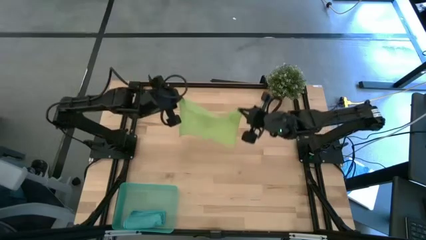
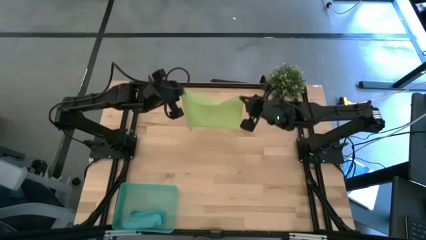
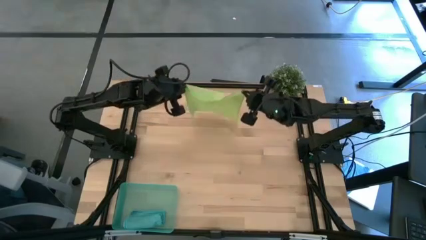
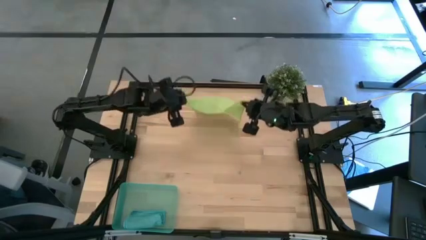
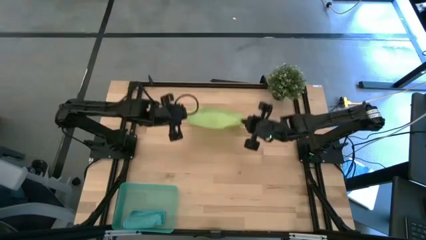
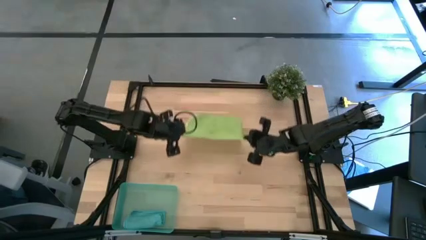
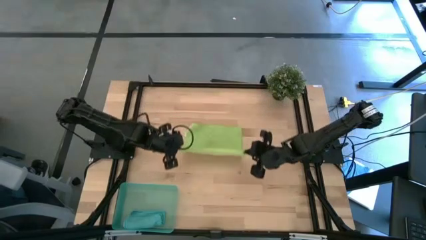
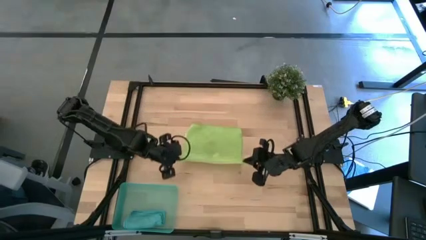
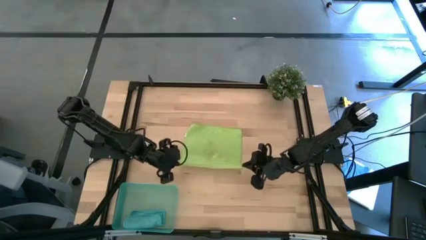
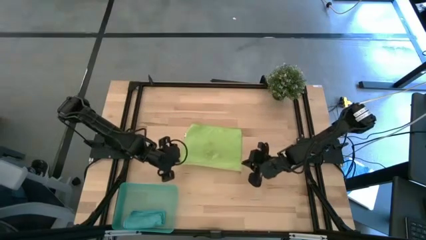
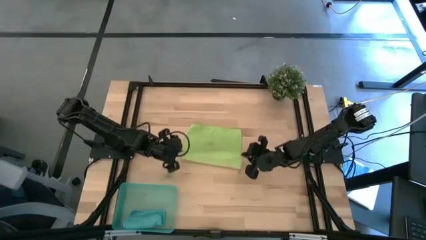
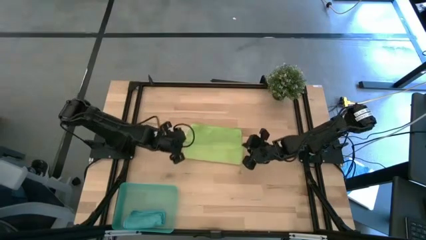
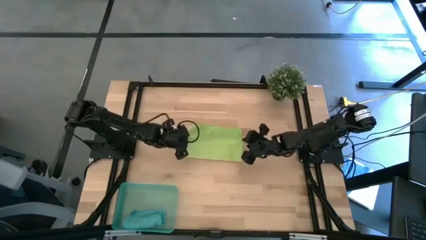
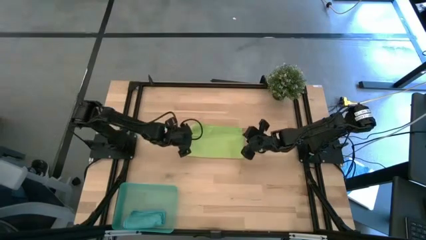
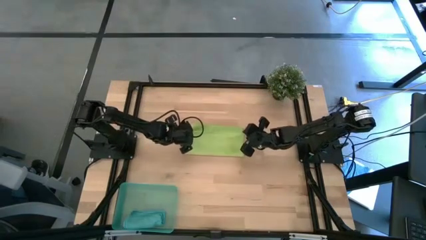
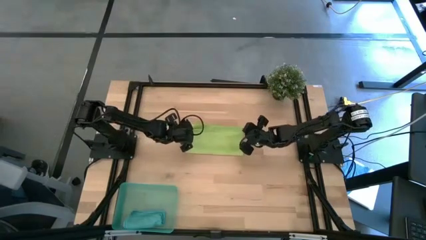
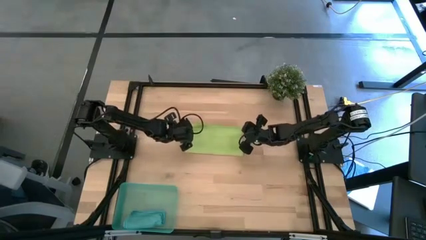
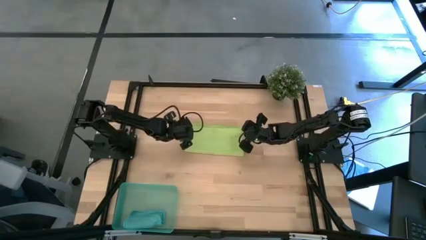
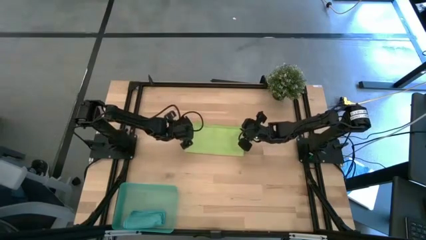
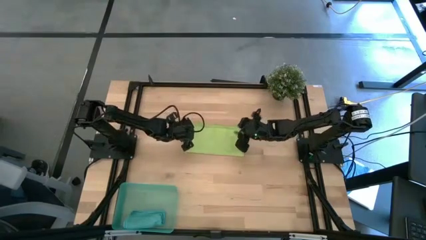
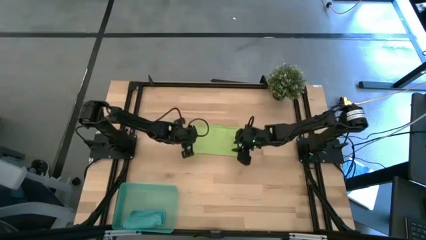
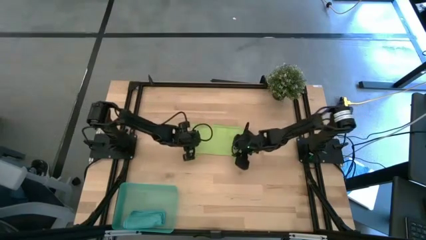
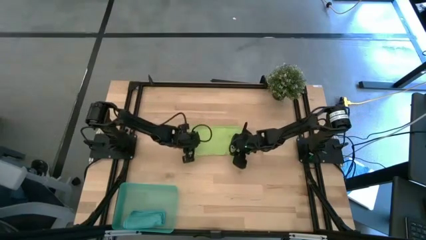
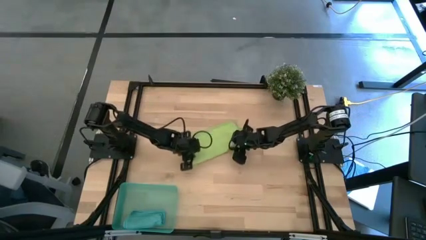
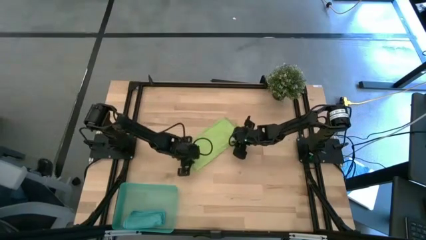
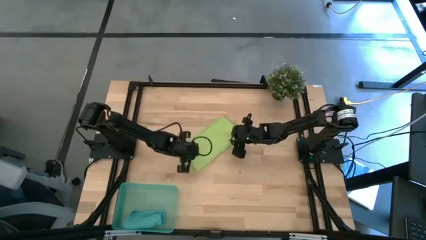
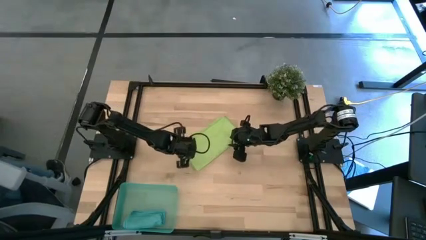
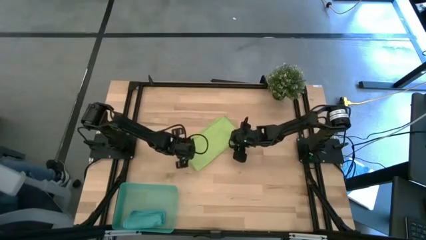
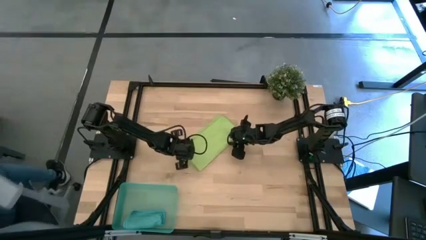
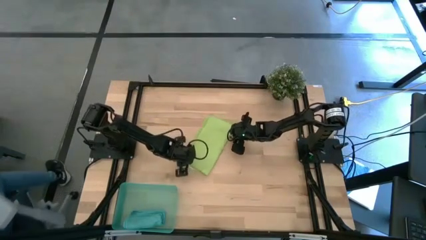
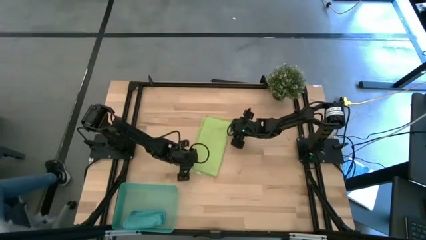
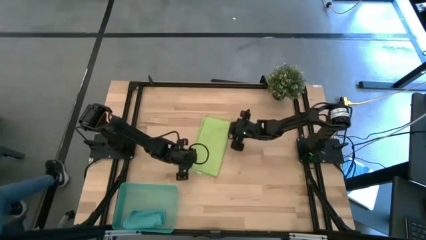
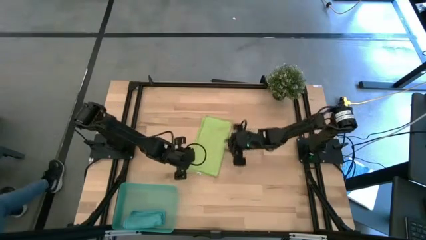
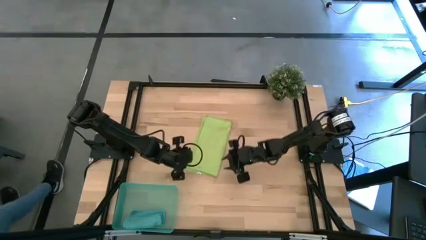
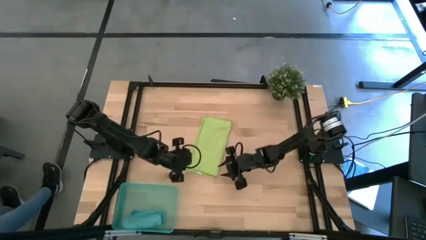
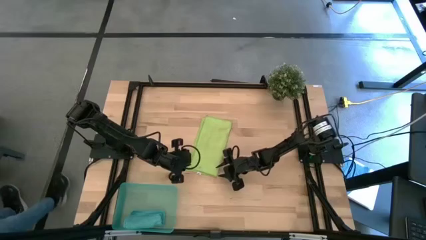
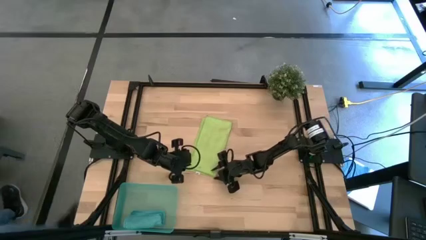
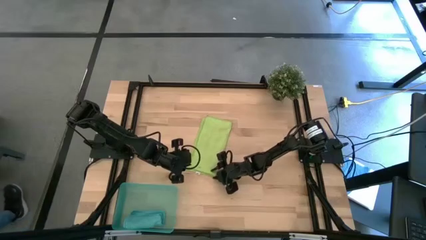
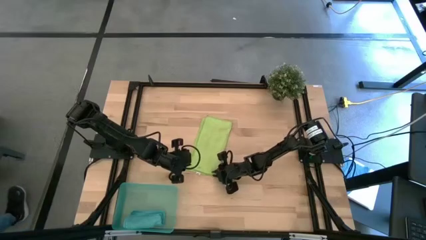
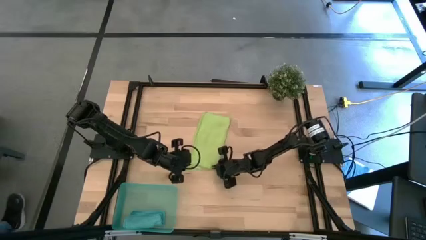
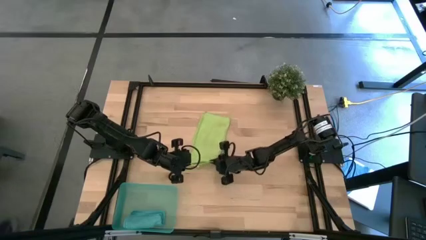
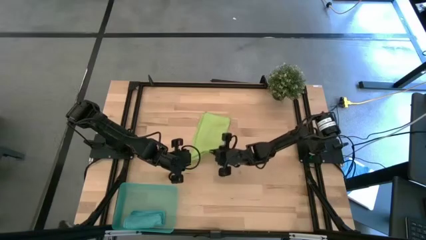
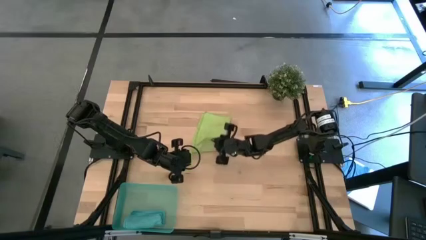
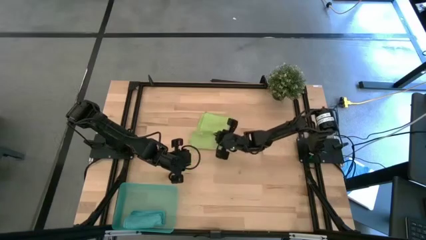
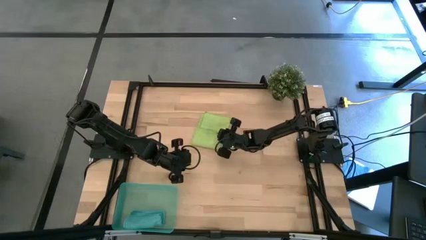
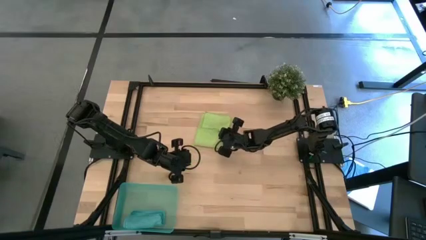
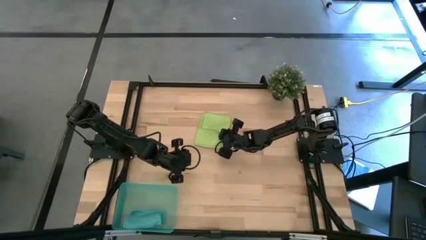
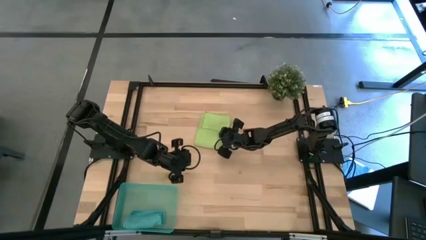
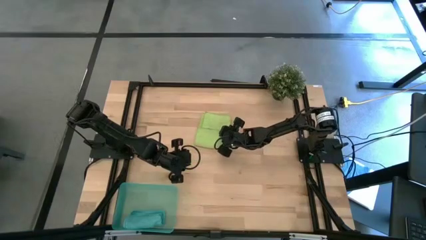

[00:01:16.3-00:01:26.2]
Task: Roll microfiber towels into tight, uniform cylinder then place into a basket
Fold the yellow green microfiber towel

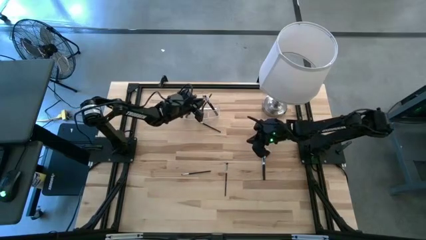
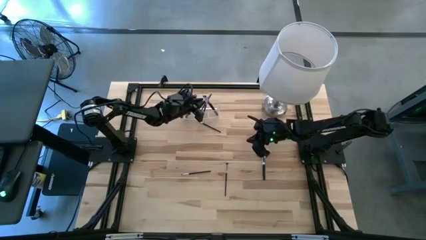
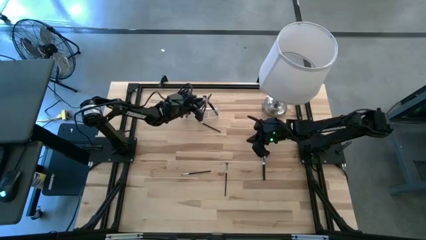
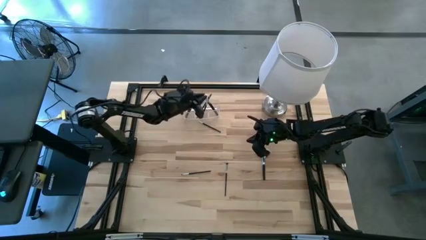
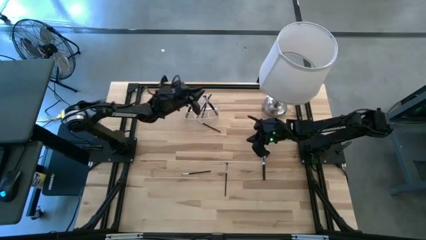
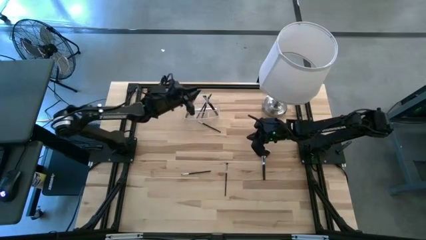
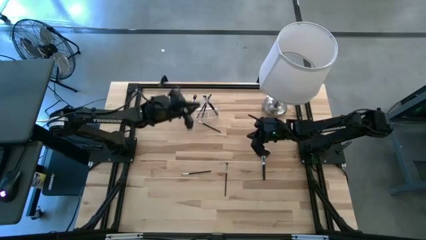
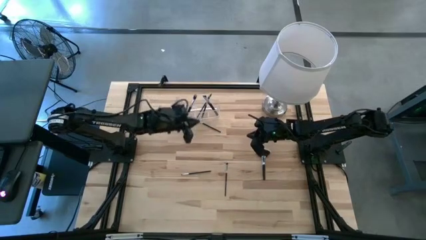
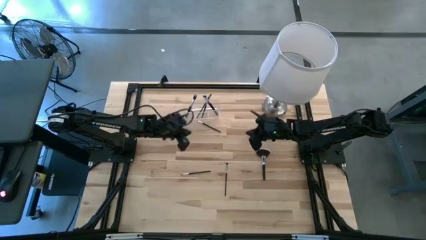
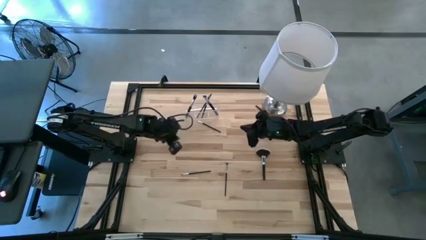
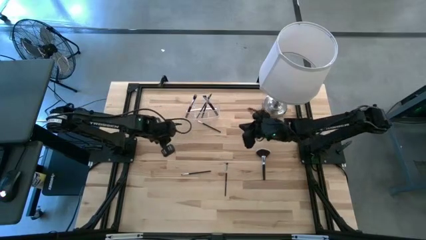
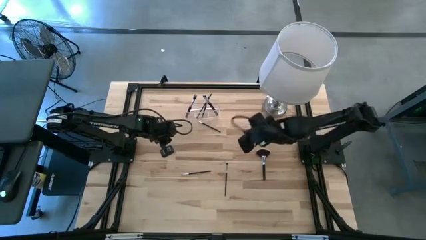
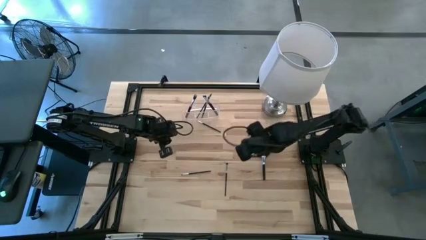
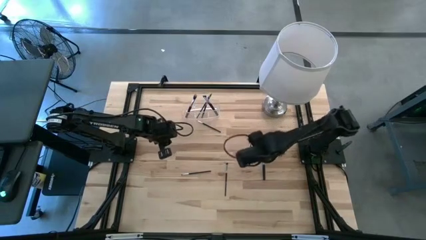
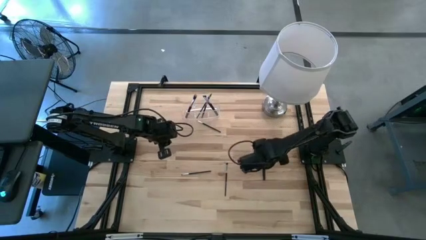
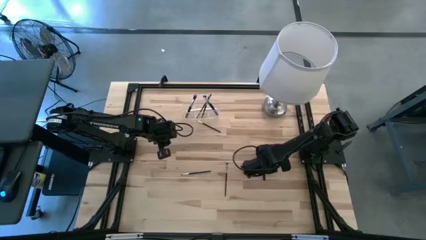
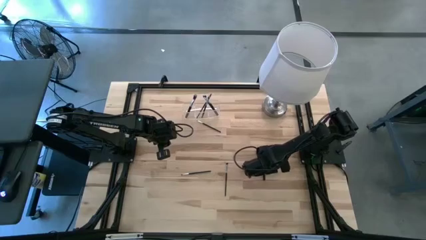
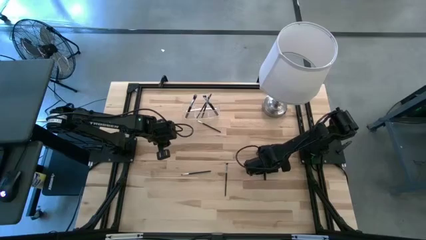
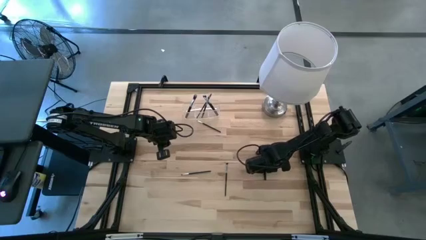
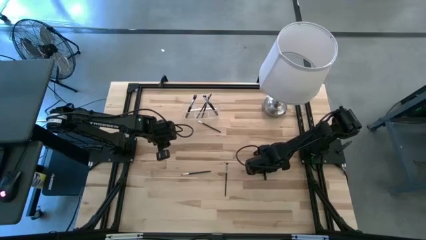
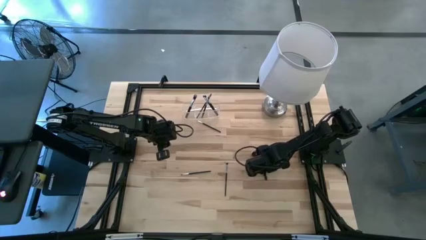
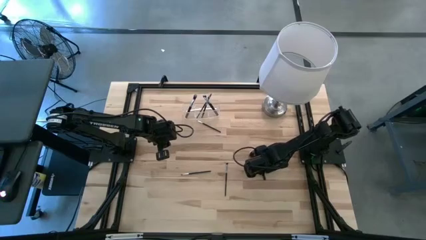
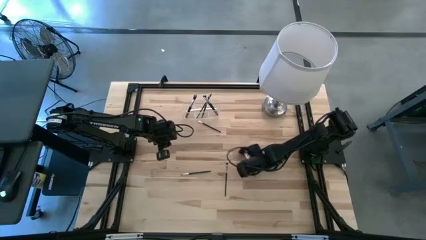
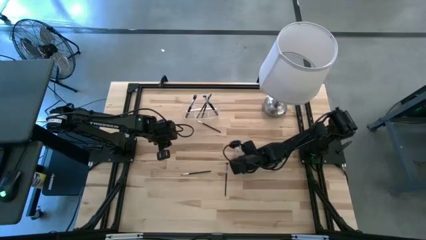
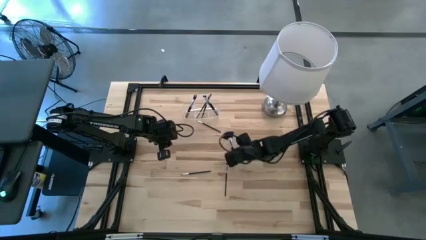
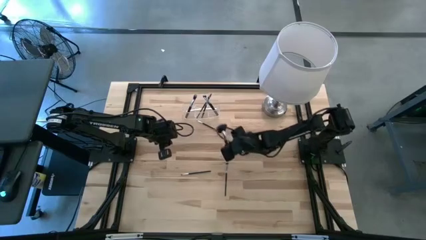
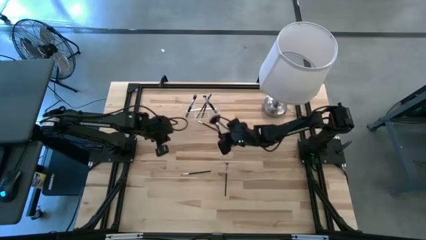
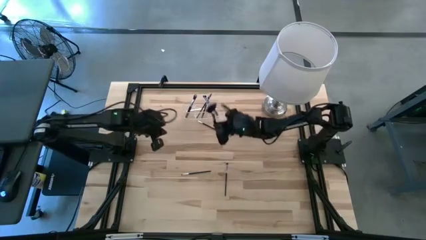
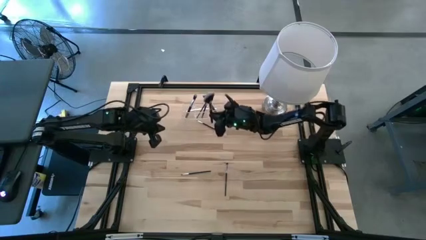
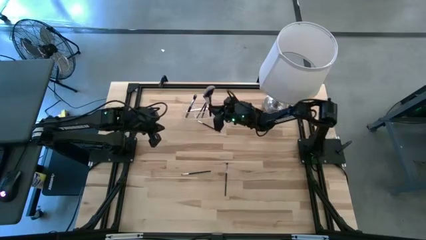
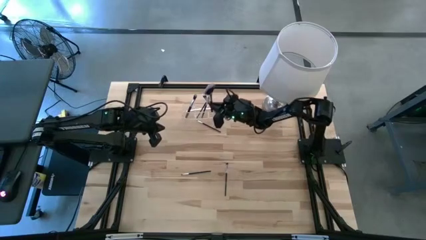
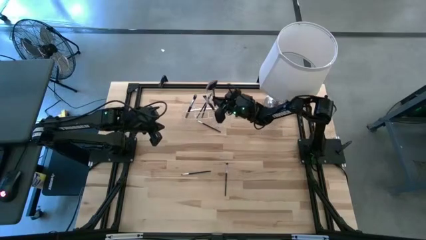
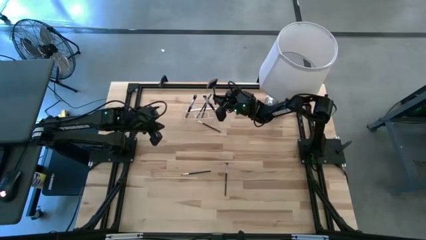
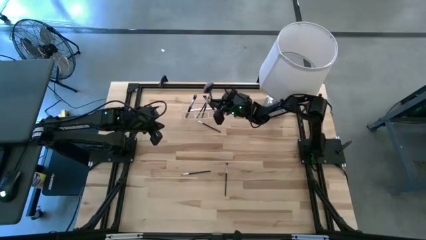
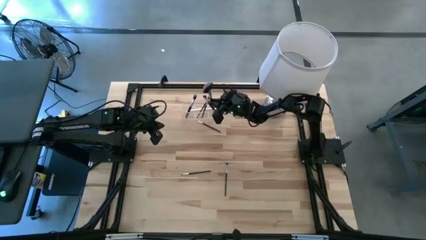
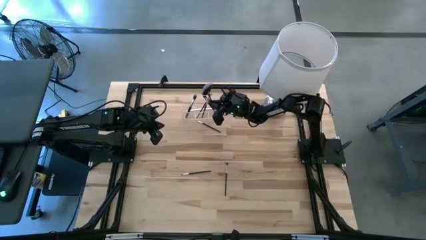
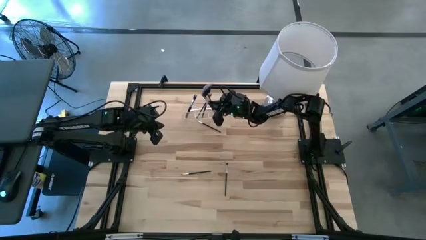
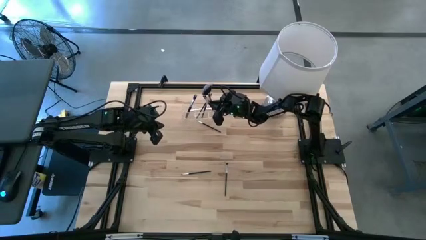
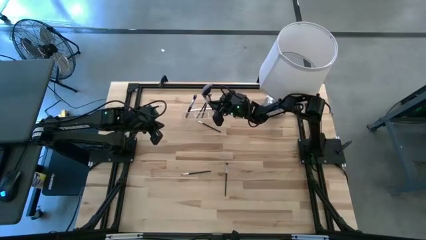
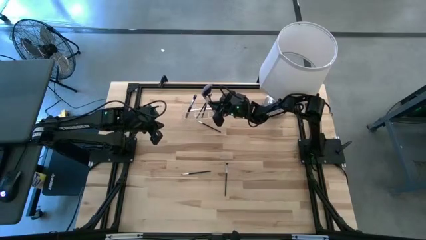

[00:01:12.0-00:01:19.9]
Task: Put items in baskets/containers
Put the highlighter brush into the transparent organizer
